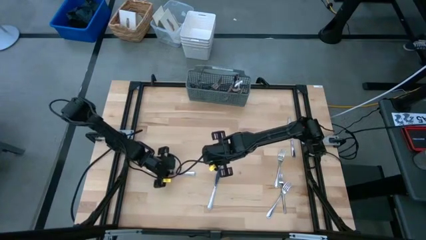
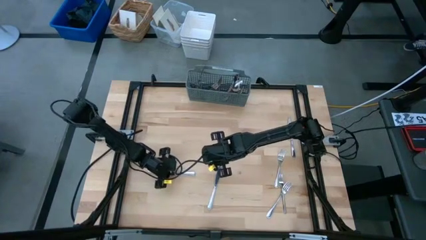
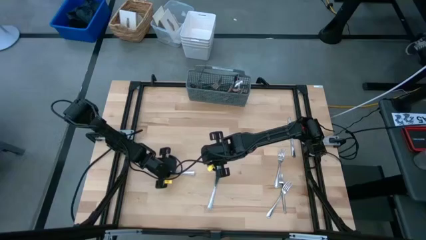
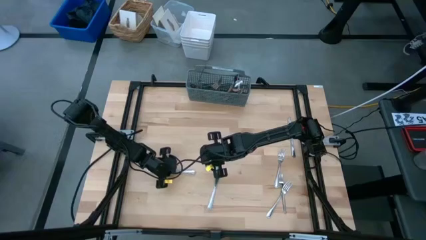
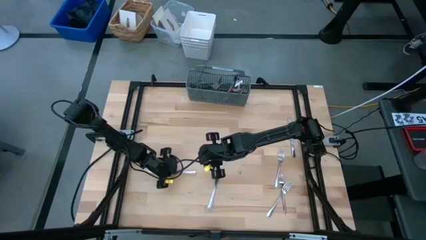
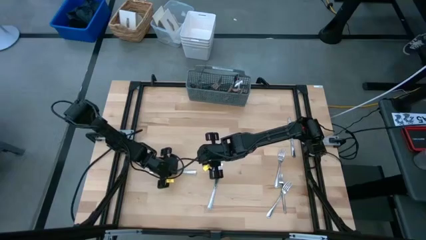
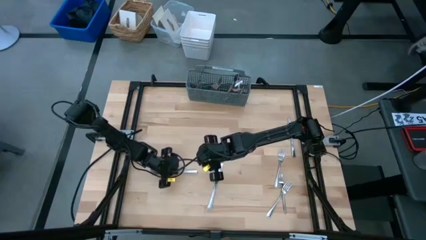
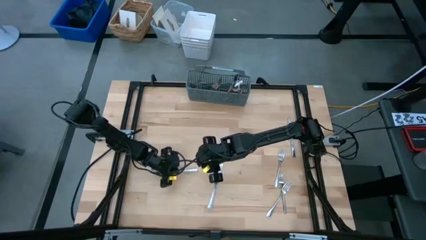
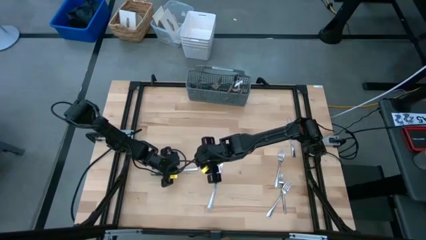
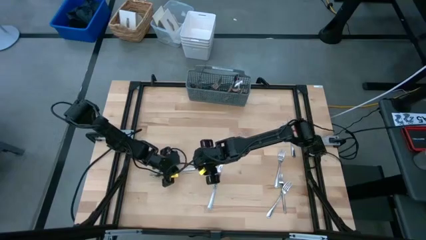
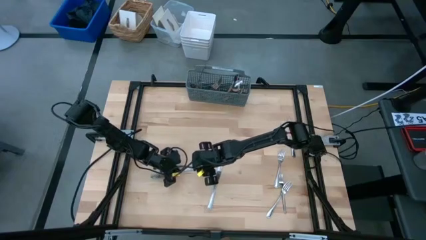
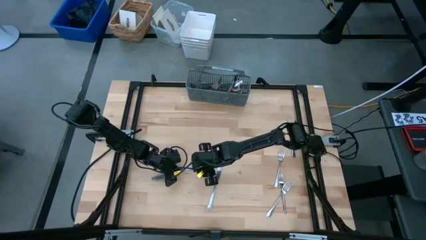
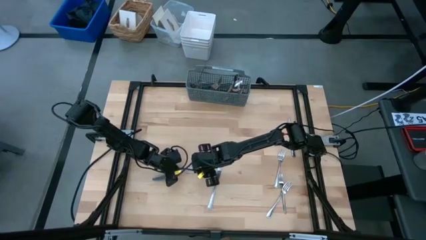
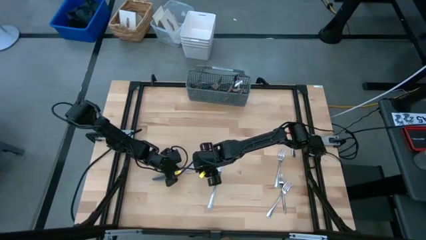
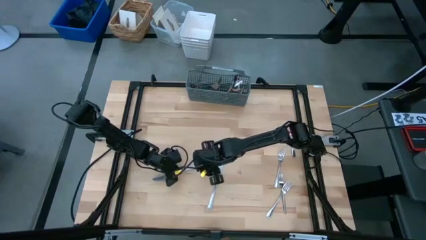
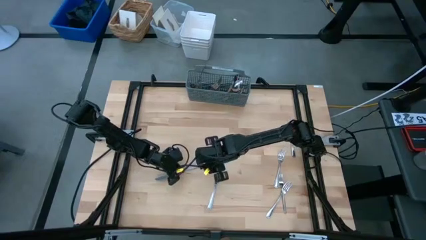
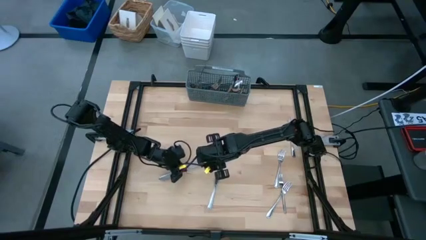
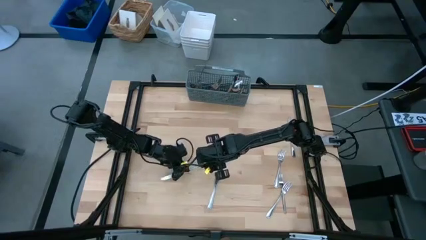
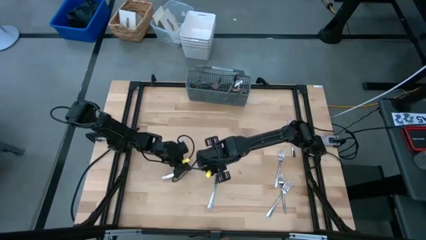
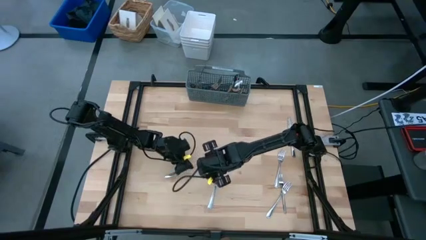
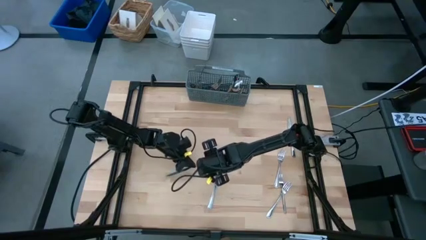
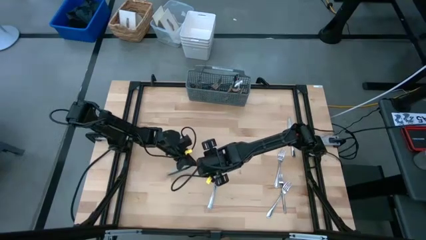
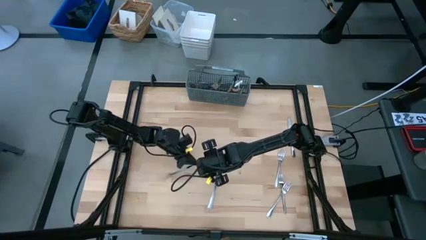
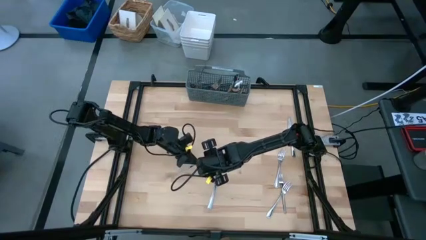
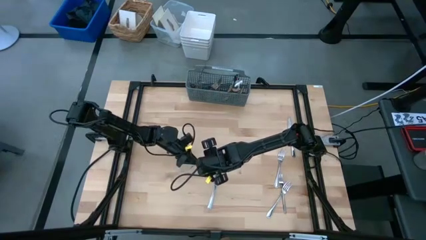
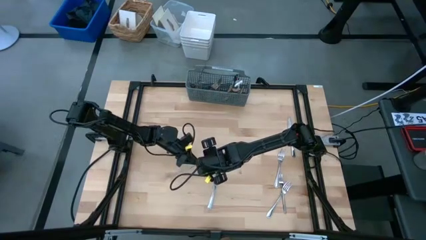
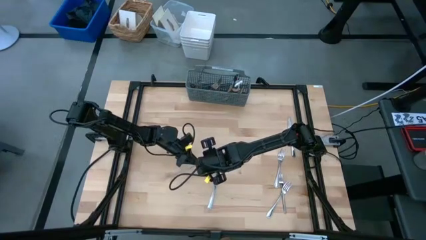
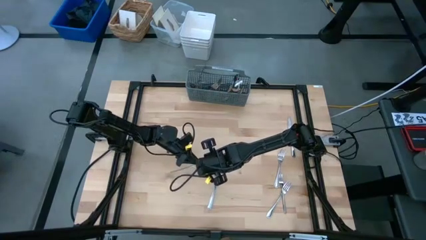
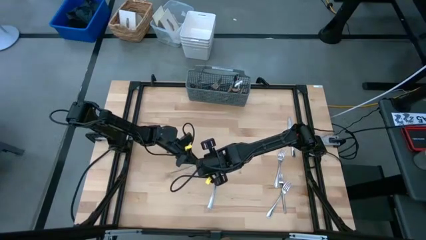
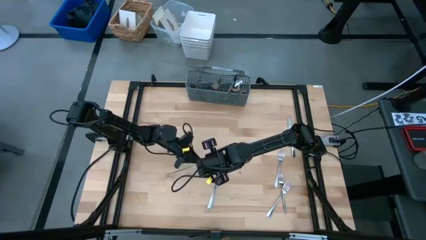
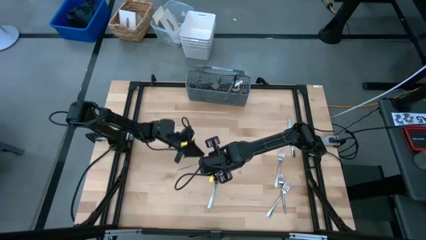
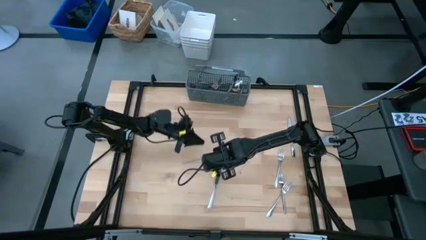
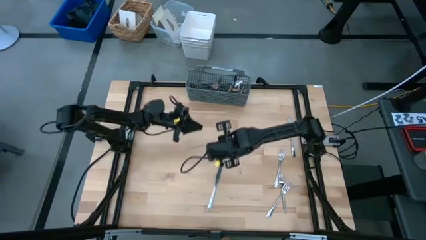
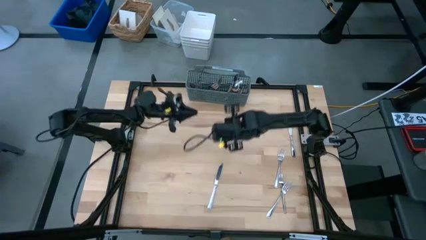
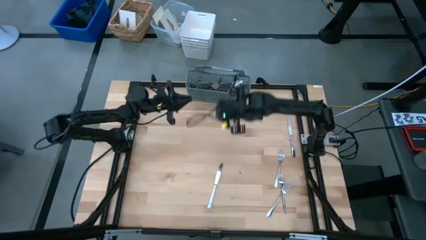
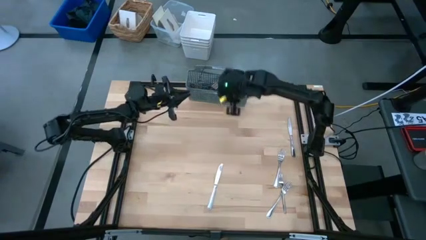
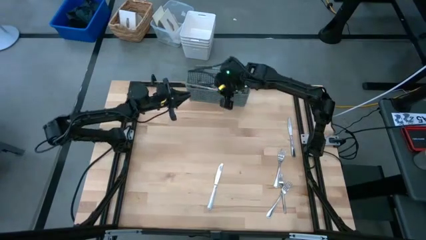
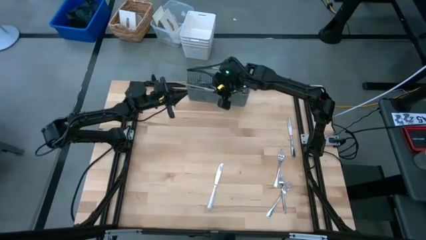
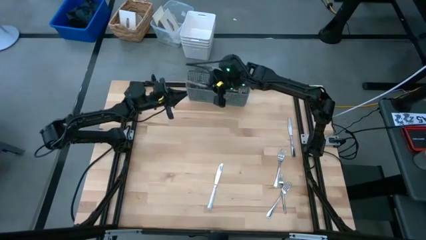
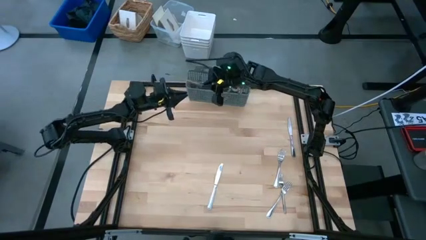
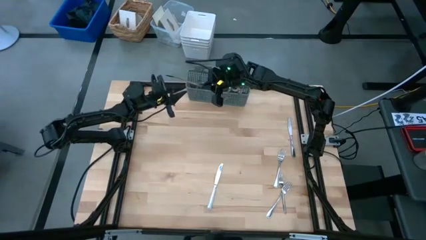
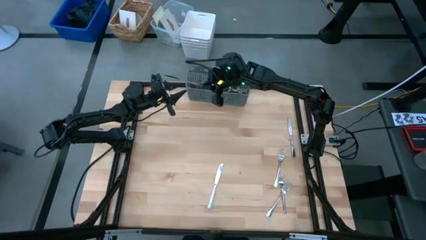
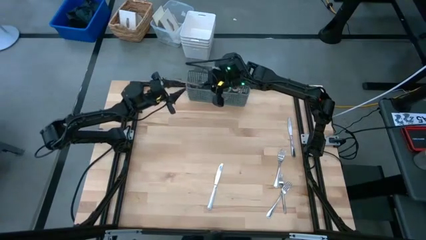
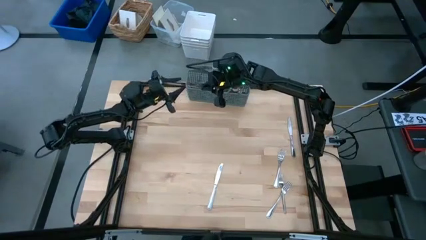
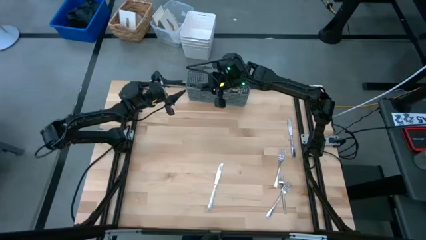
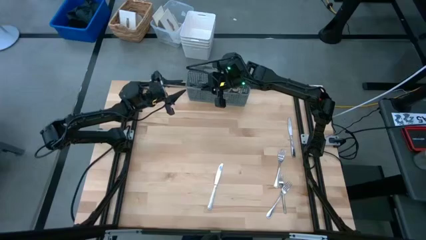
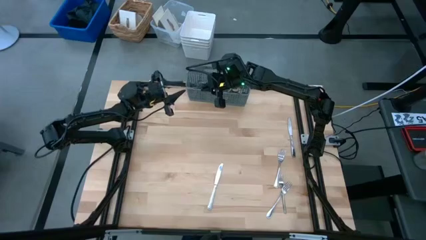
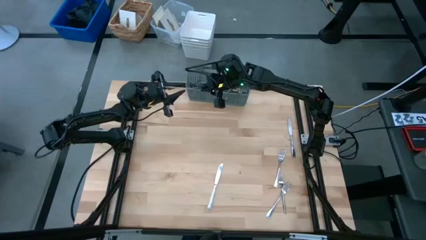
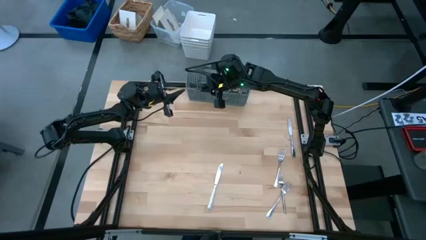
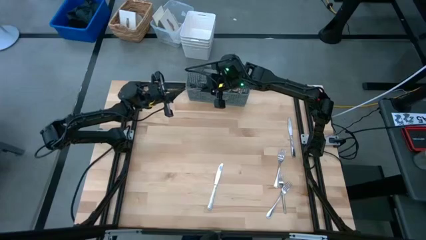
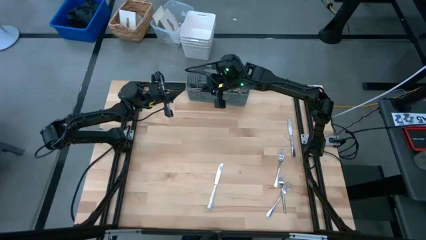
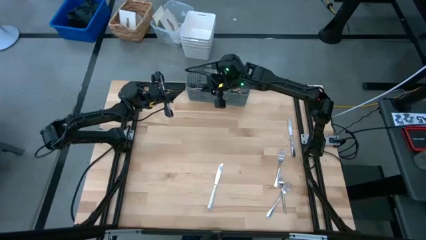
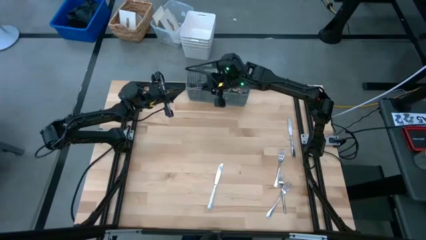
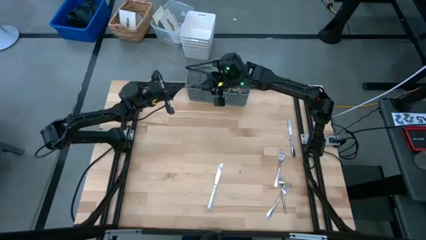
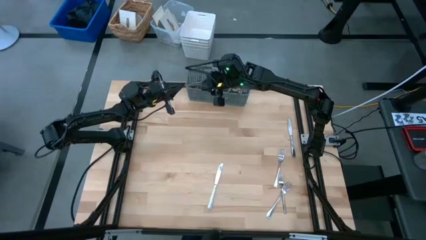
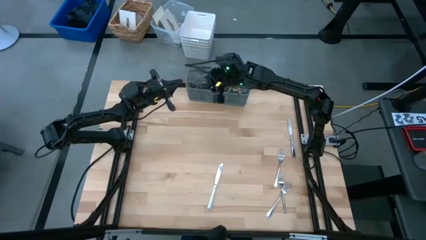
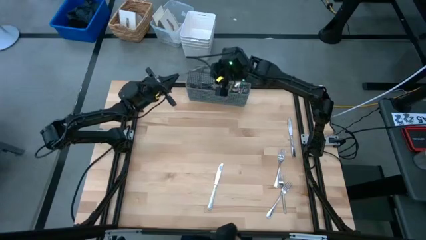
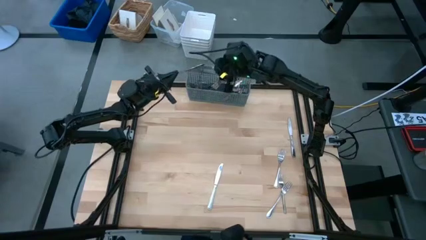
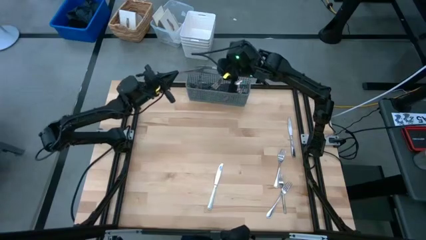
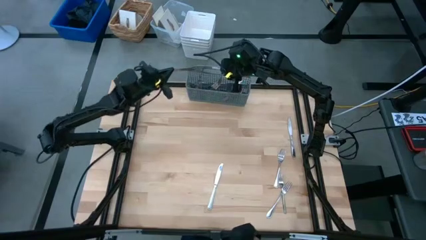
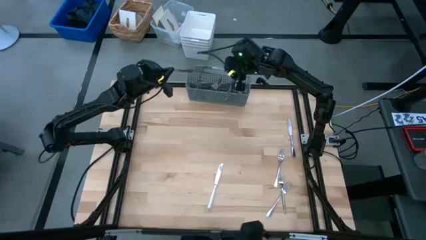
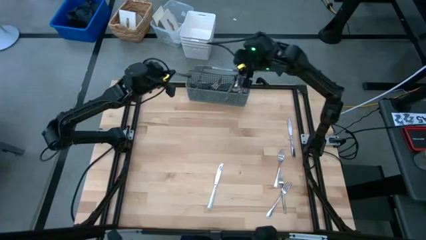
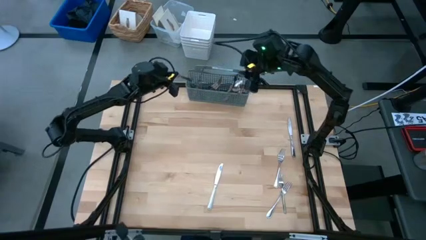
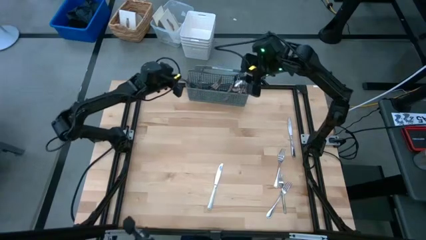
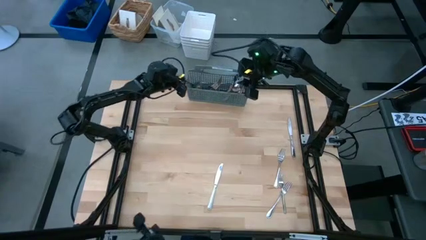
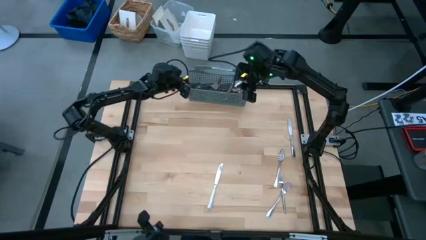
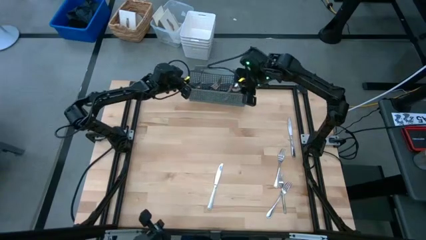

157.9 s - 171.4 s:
Task: Sort silverware
Put the table knife into the gray silverware organizer

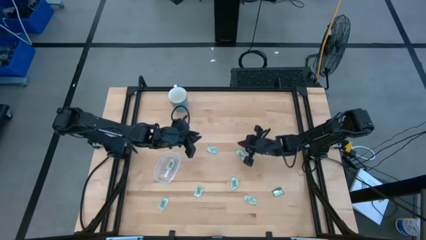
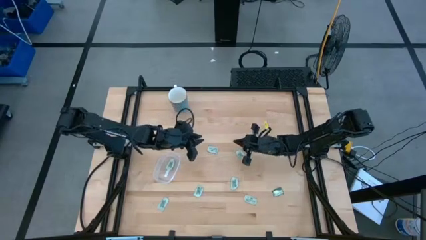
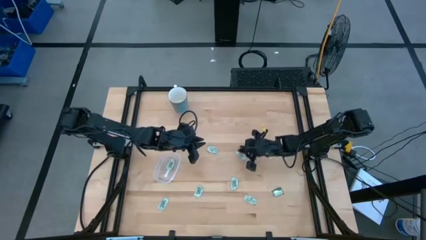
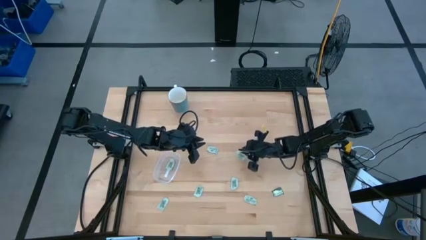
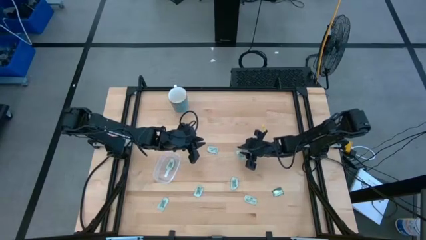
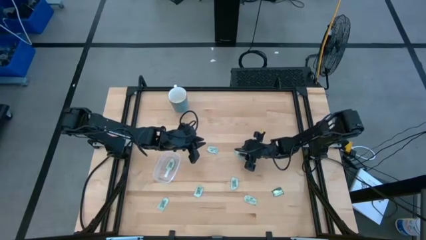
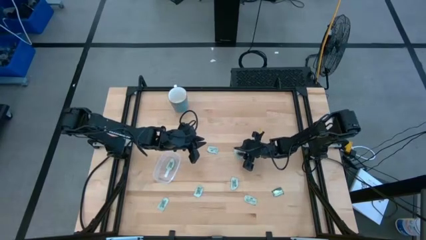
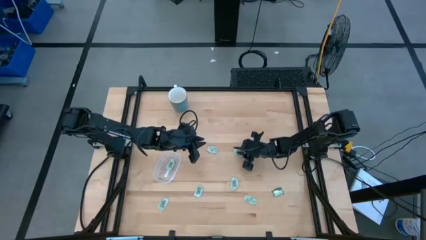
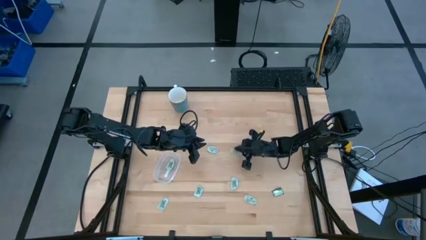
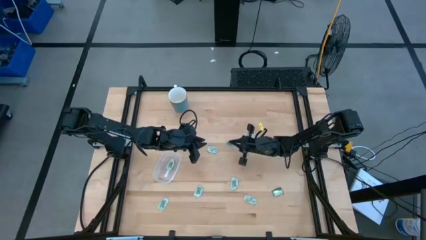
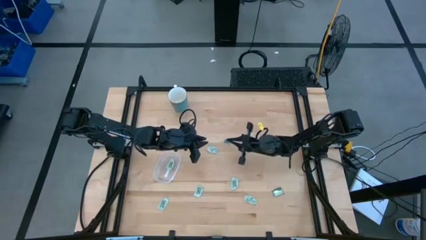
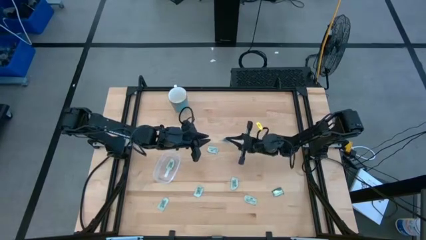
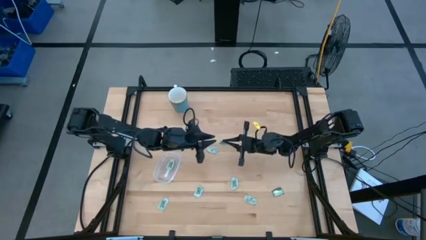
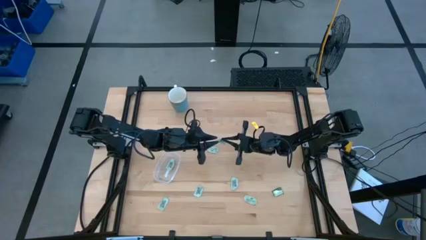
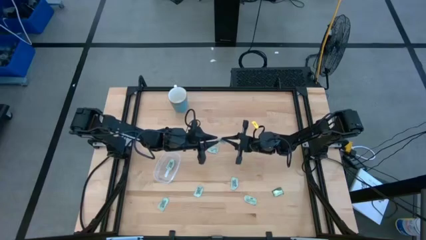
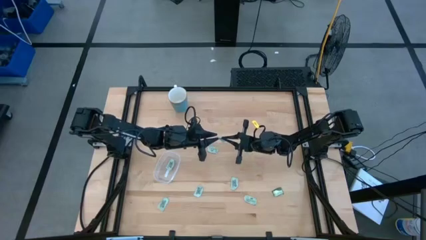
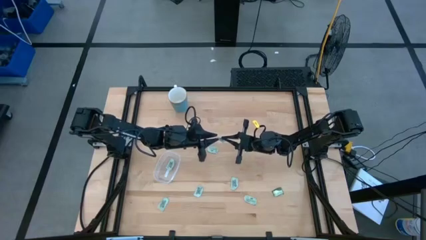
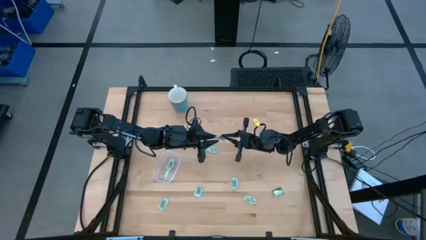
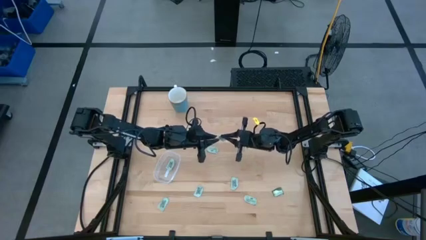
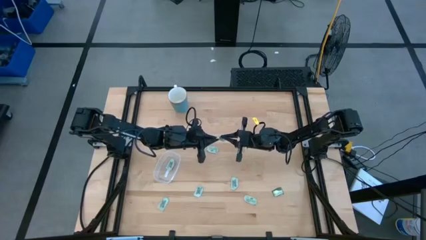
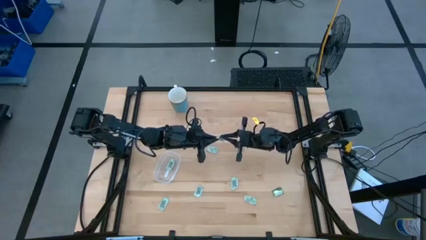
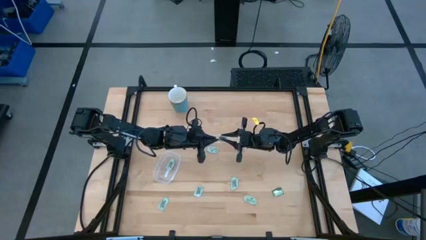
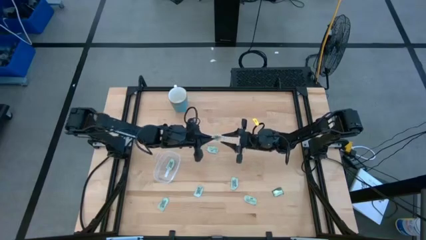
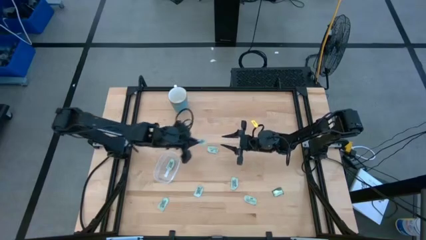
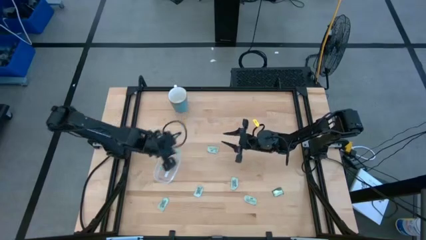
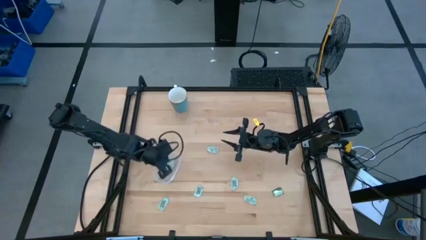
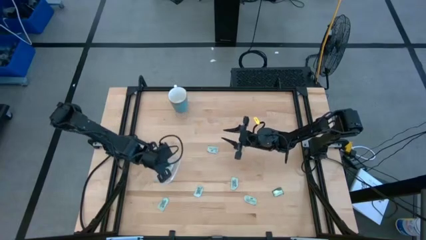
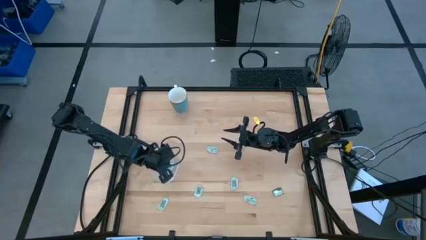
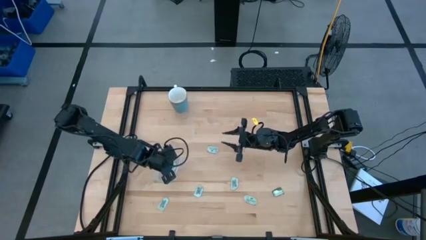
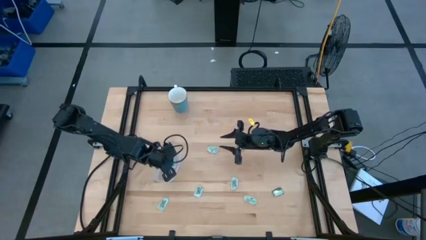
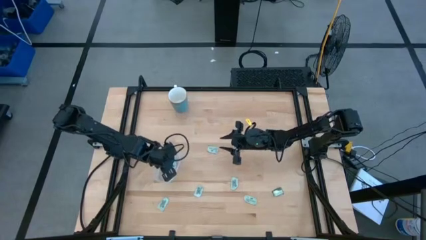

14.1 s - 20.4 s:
Task: Pick and place Stevia / Truvia into bins
Put the stevia packet into the transparent container
